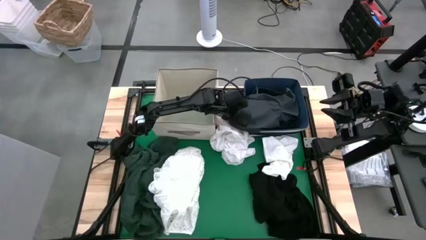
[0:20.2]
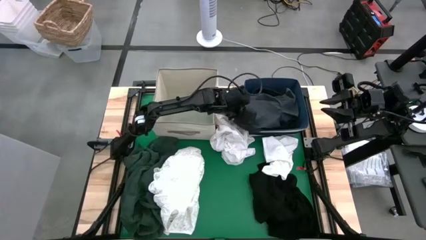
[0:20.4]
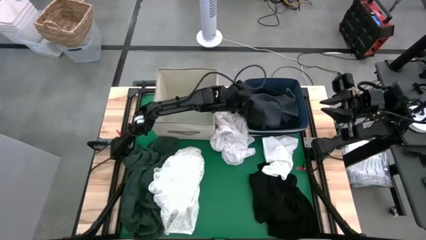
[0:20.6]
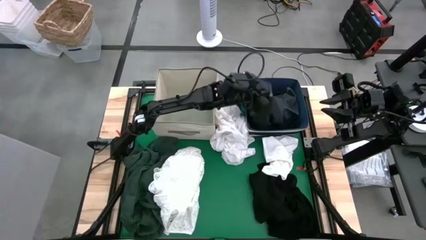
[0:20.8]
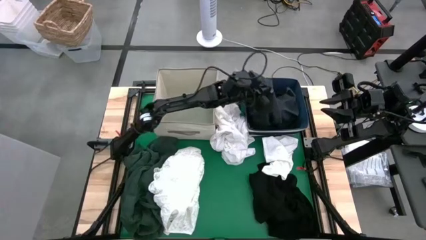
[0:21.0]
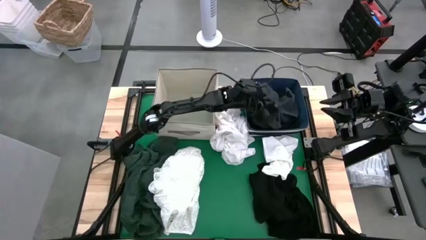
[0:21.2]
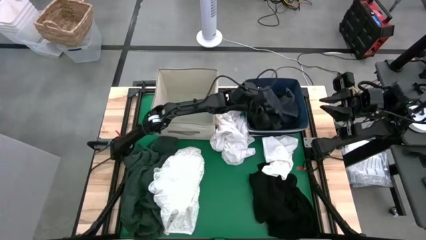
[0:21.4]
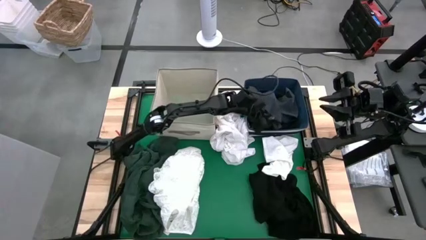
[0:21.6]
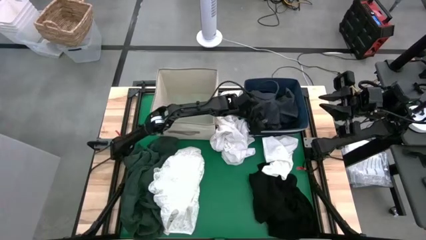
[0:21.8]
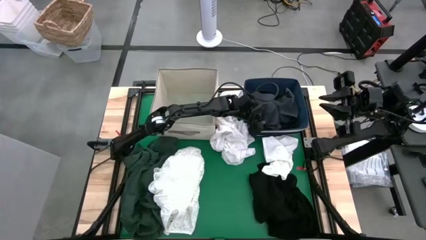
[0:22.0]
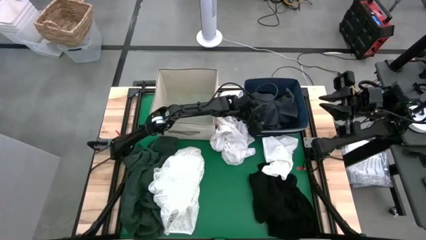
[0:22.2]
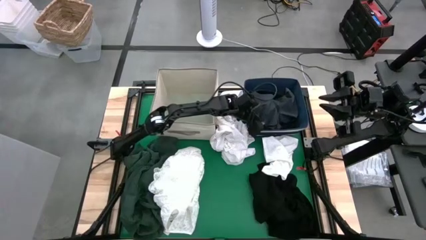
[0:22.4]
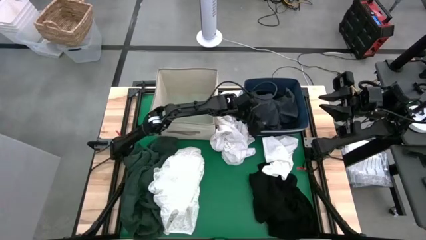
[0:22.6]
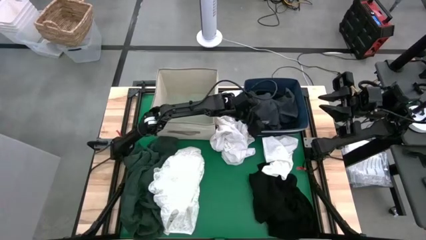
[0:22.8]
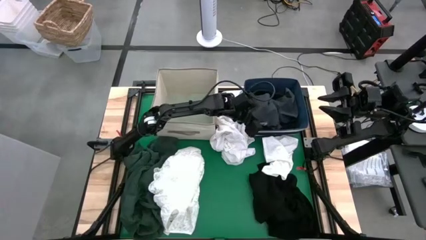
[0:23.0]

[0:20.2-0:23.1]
Put the gray shorts into the blue laundry bin

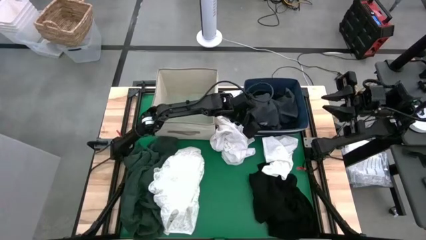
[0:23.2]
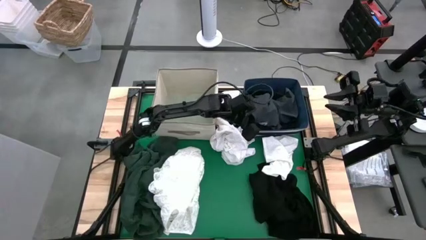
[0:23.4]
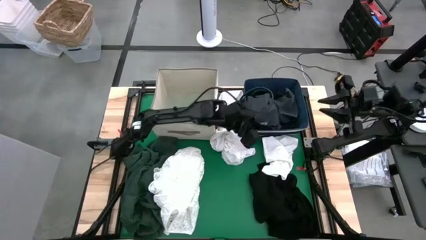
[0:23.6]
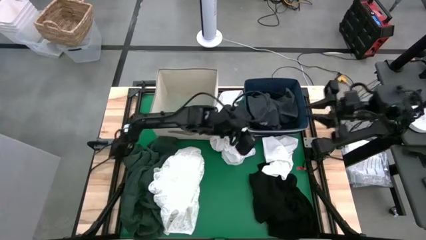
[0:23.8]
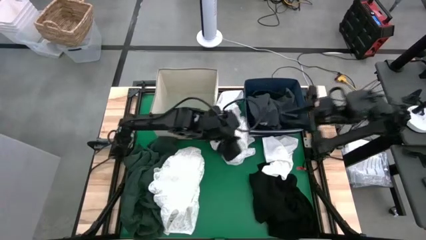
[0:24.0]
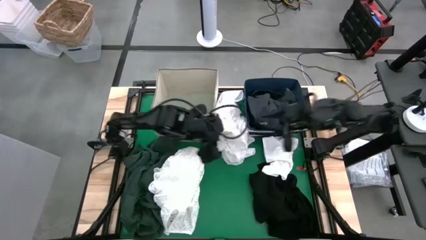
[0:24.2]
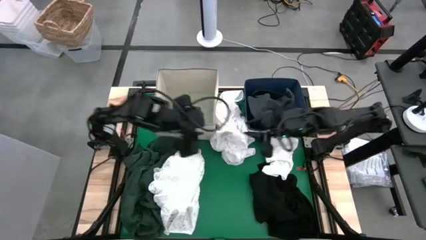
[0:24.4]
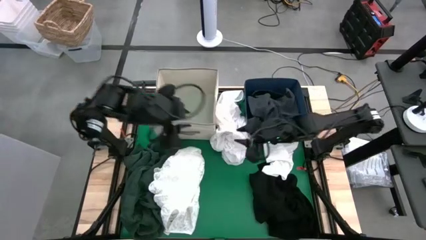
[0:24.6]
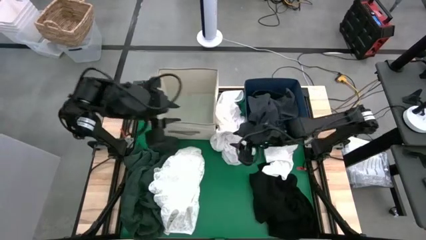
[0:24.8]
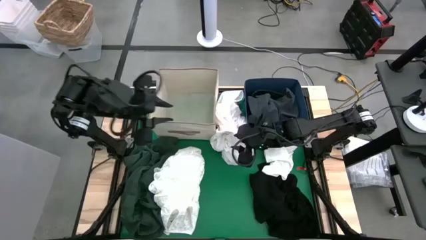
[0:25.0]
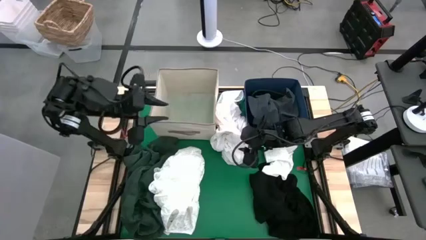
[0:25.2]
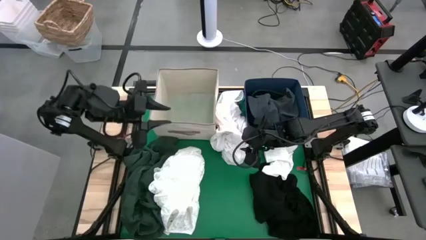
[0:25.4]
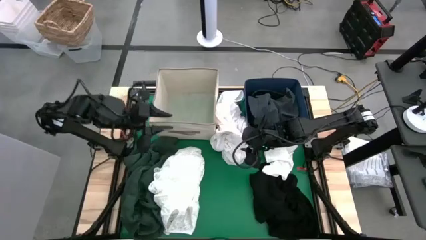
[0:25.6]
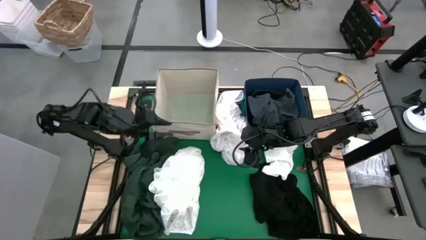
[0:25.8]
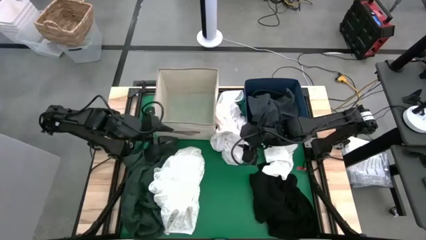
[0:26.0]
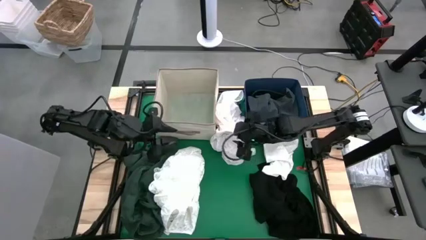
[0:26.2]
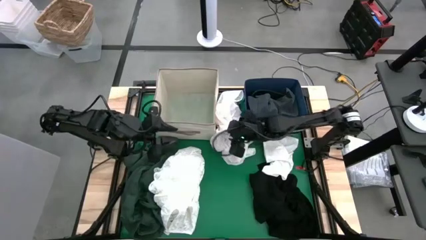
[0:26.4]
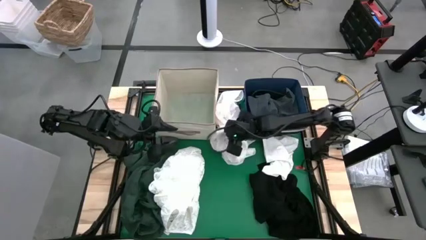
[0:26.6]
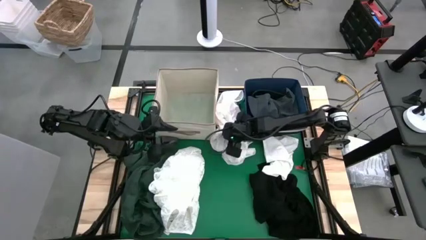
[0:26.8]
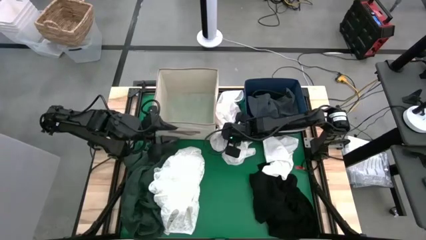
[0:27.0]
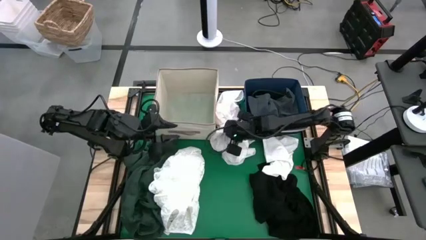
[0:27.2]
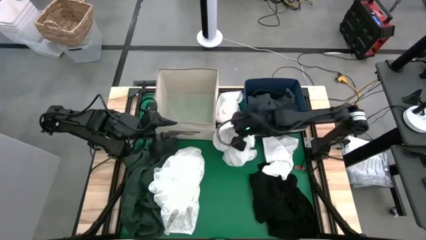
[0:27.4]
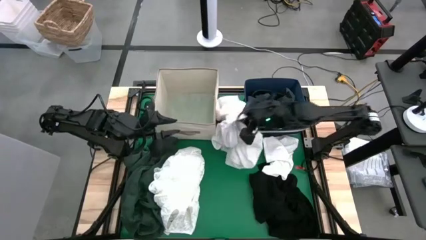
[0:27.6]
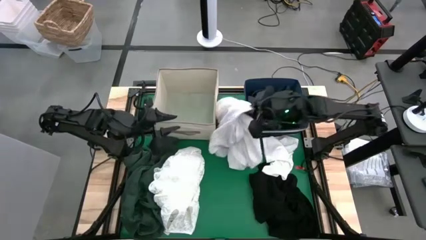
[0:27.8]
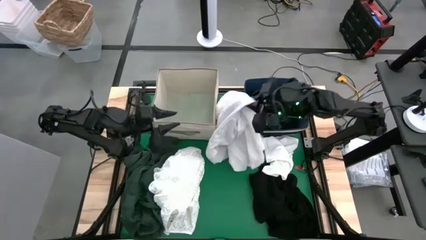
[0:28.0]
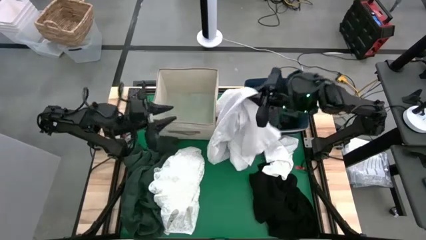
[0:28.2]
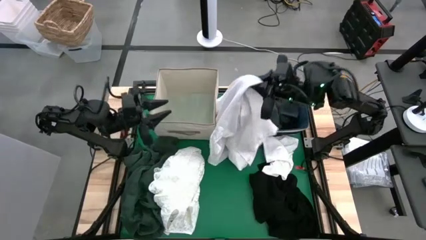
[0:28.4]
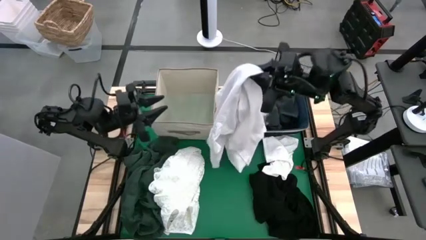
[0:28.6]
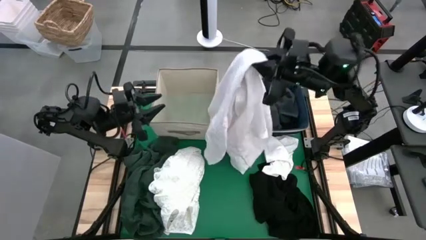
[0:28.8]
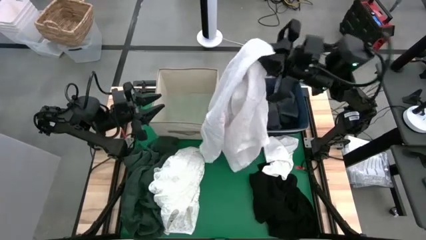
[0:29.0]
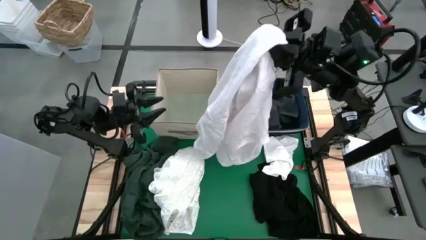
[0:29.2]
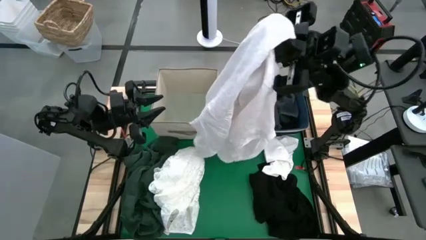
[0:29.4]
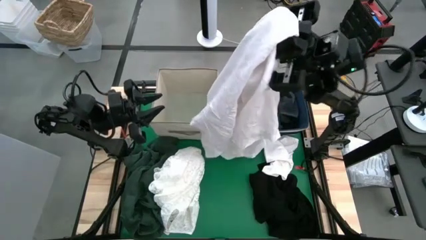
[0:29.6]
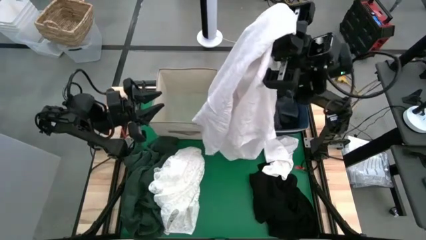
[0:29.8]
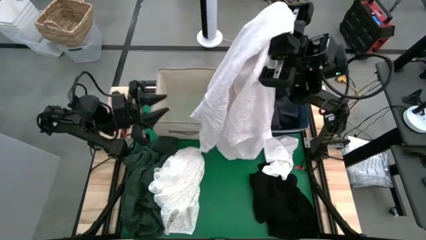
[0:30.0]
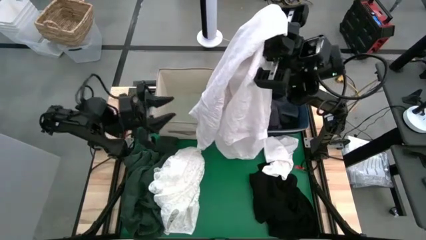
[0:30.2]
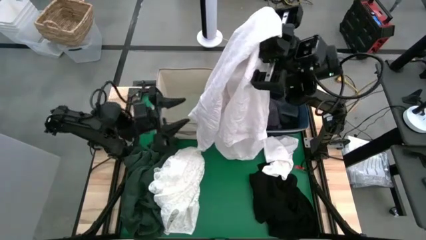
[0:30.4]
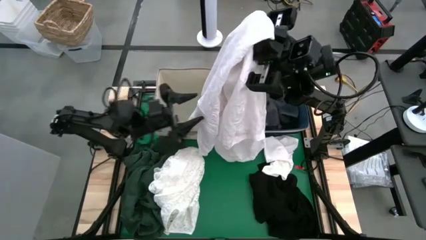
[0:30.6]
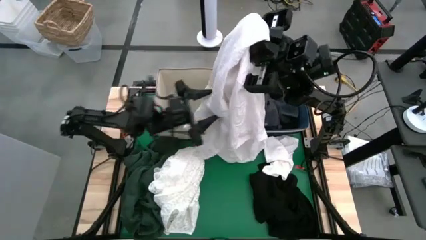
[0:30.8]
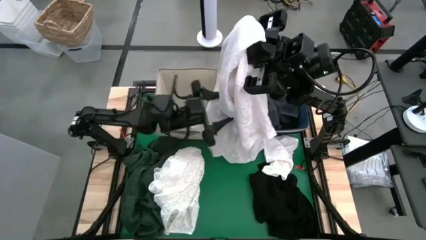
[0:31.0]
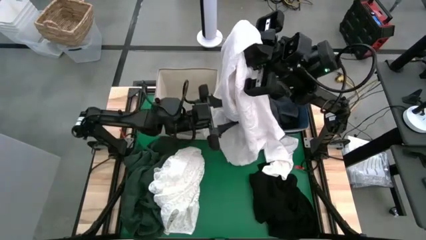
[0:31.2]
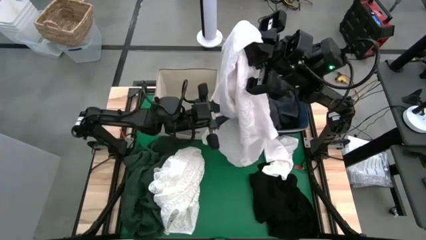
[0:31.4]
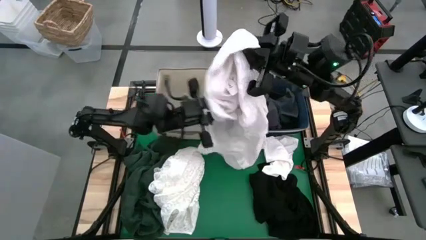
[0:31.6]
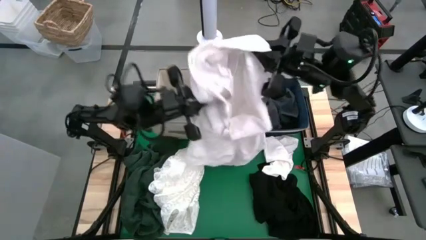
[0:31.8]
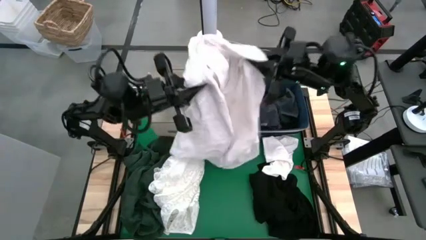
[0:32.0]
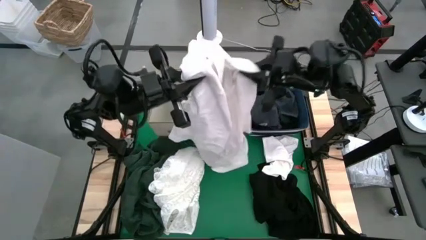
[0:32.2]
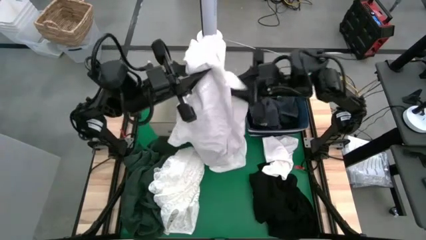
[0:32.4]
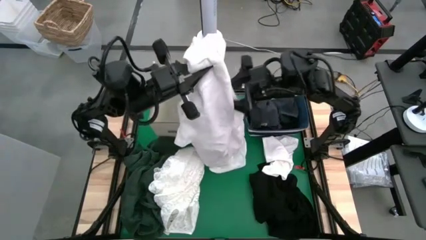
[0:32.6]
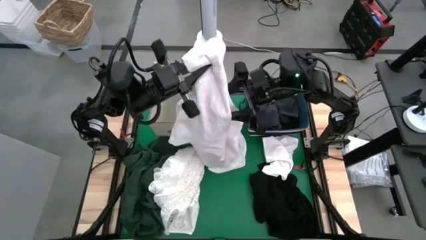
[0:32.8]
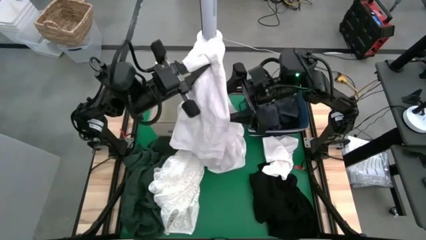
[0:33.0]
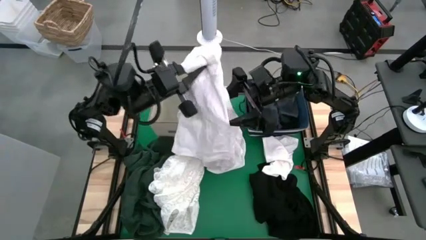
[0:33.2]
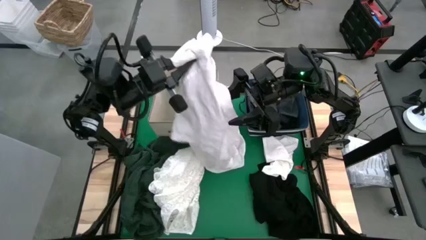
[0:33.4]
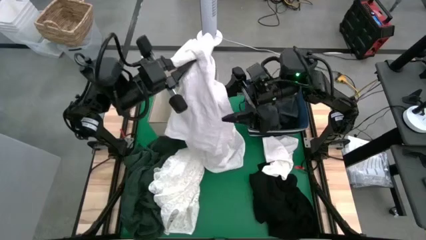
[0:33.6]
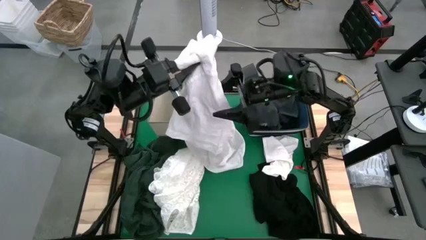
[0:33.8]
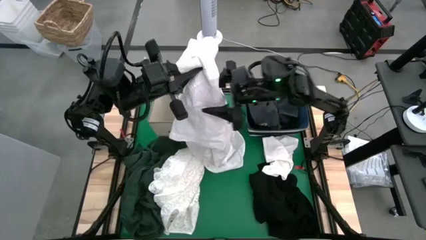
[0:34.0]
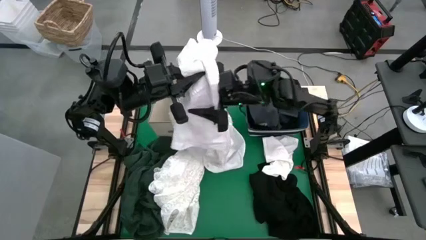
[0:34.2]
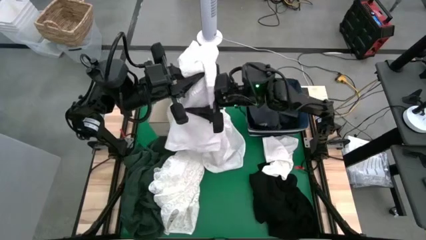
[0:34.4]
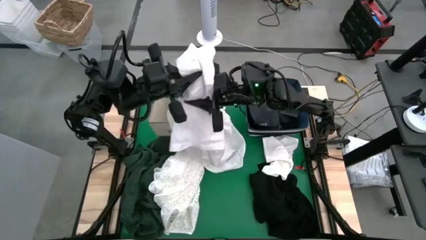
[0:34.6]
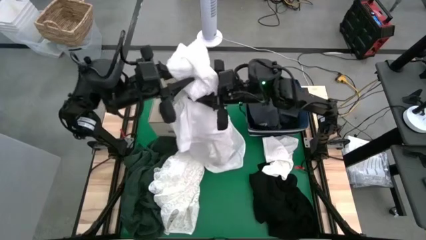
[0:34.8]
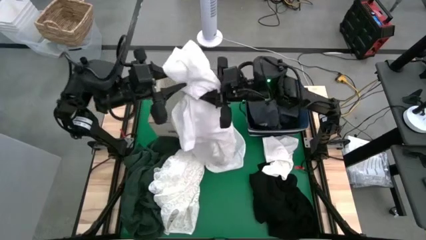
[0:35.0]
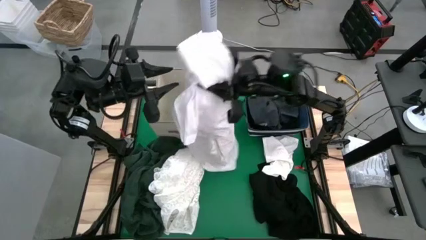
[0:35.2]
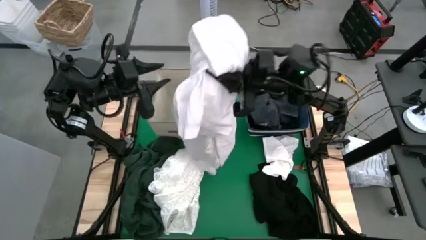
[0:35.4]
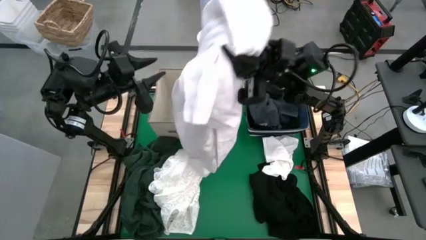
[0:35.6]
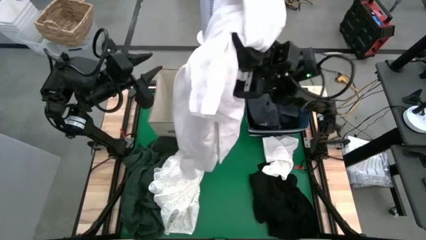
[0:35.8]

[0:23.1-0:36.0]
Put the right white shirt into the white laundry bin
